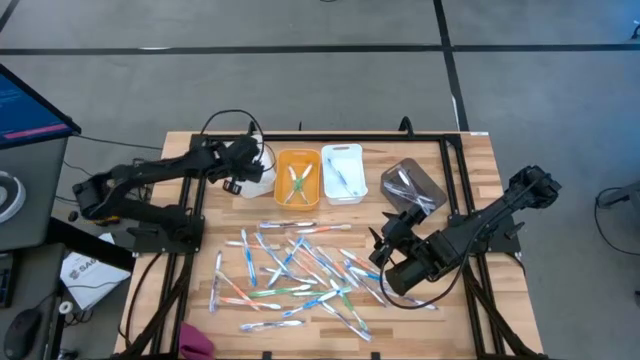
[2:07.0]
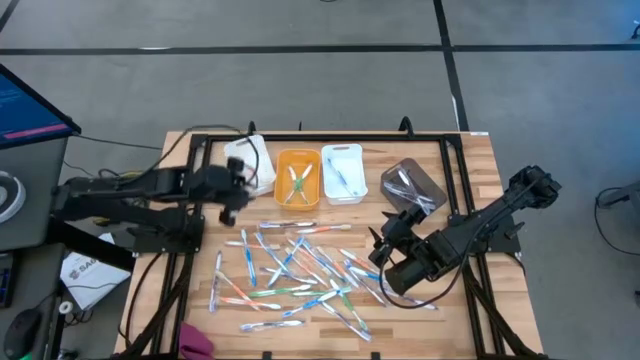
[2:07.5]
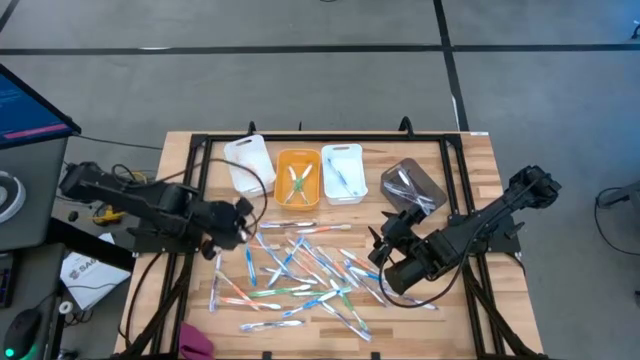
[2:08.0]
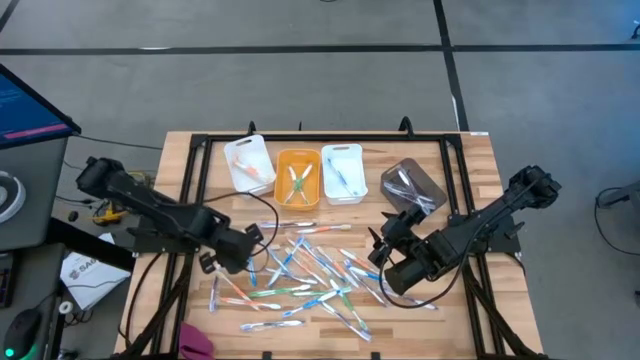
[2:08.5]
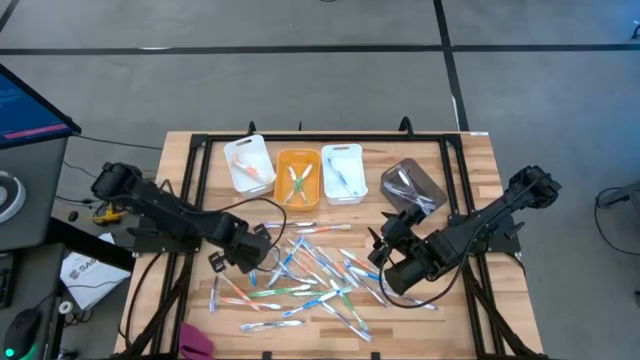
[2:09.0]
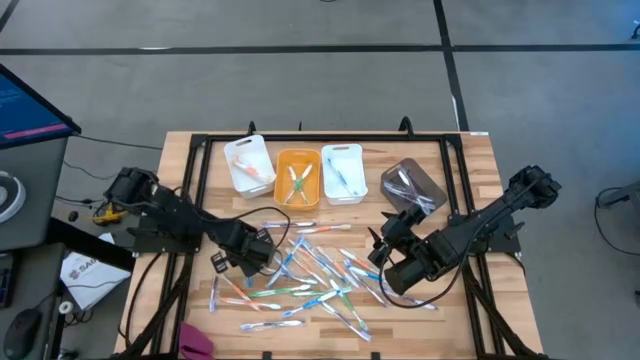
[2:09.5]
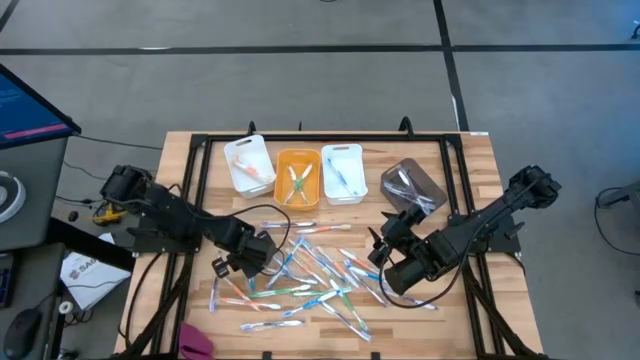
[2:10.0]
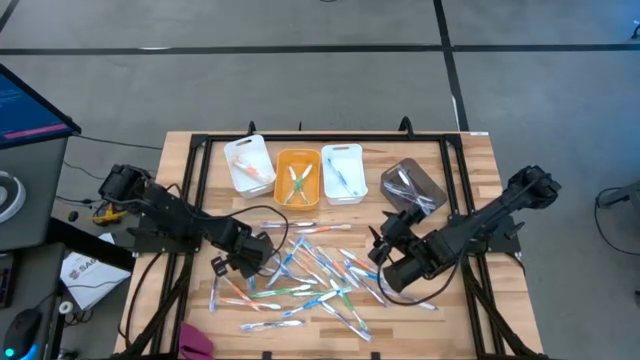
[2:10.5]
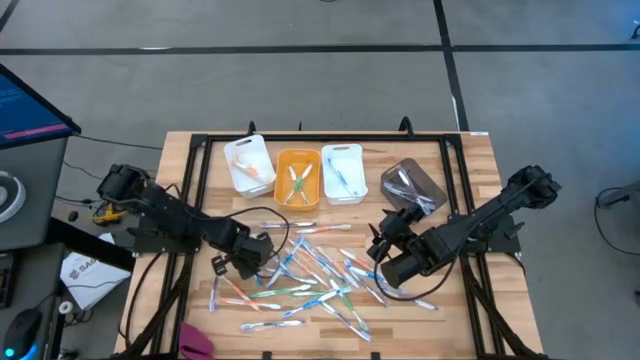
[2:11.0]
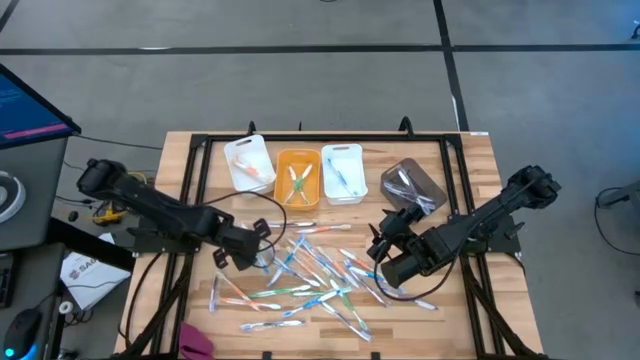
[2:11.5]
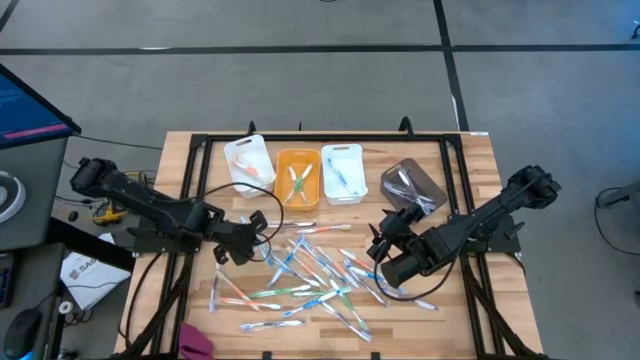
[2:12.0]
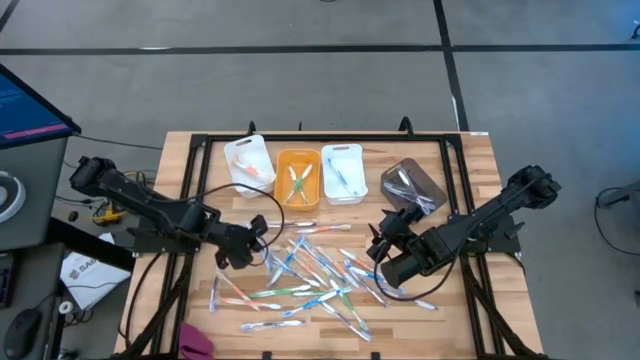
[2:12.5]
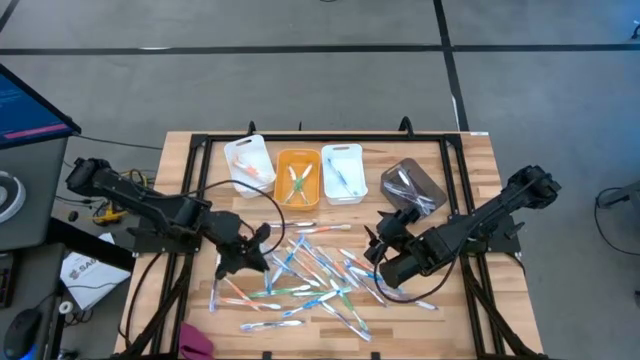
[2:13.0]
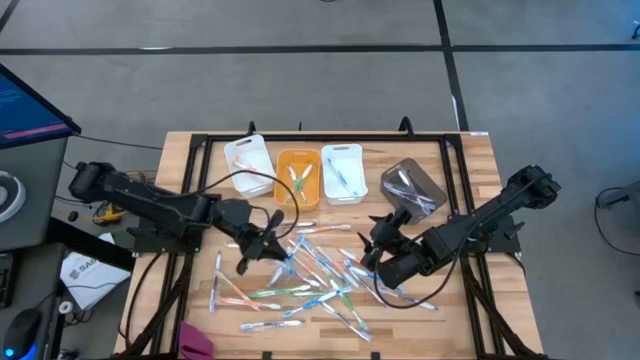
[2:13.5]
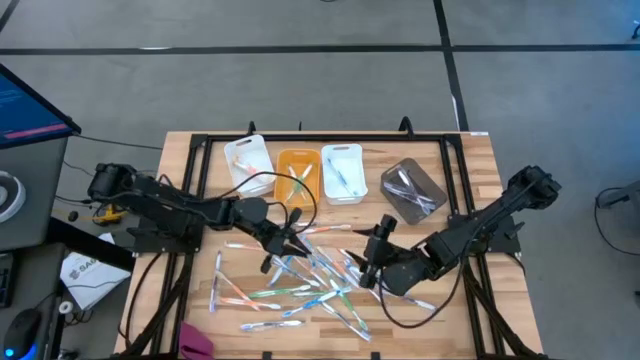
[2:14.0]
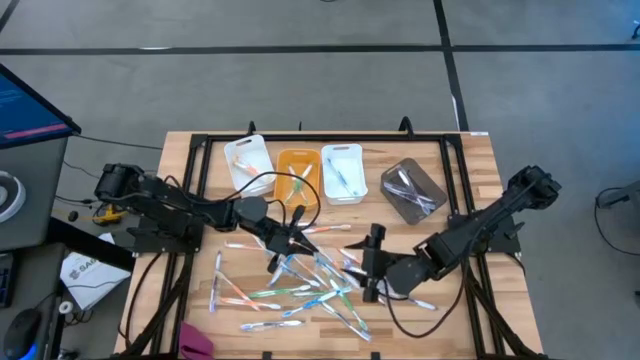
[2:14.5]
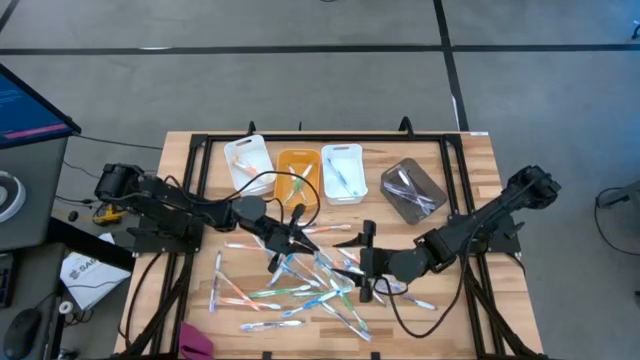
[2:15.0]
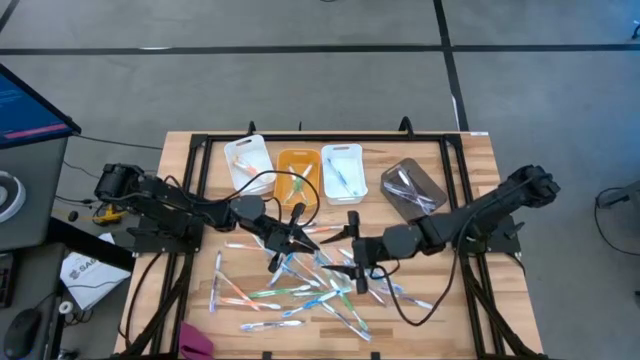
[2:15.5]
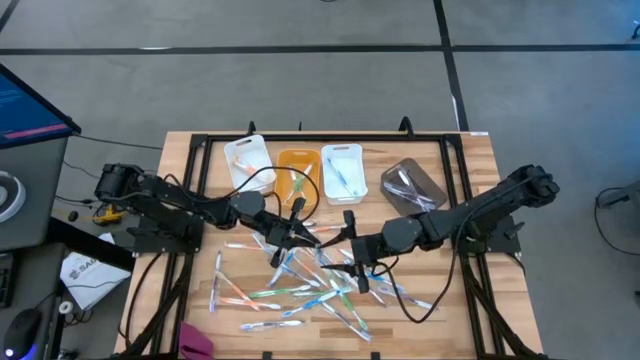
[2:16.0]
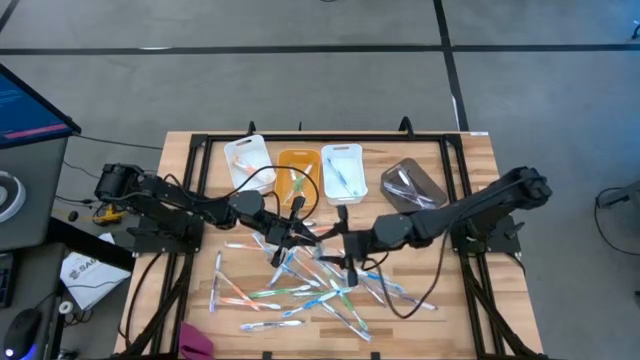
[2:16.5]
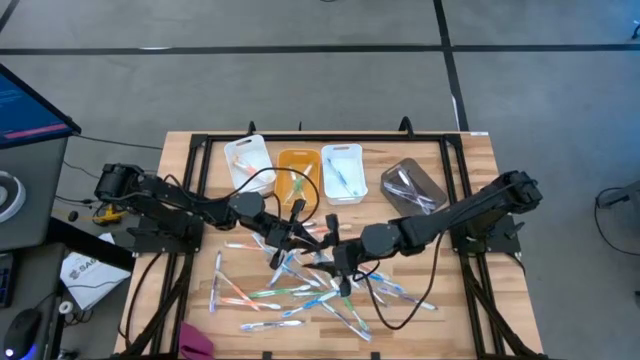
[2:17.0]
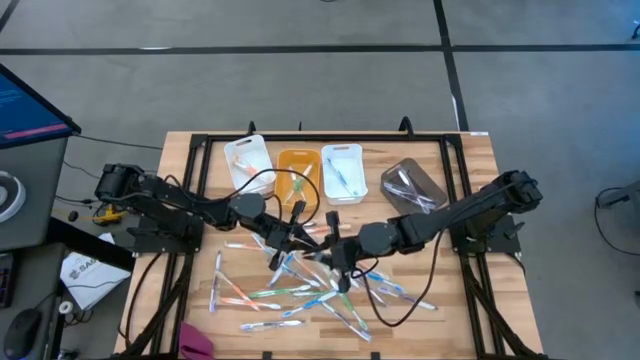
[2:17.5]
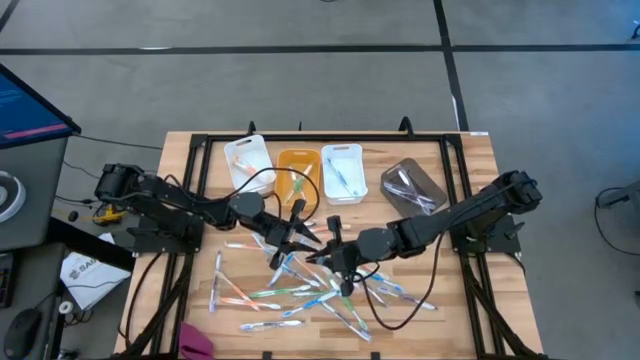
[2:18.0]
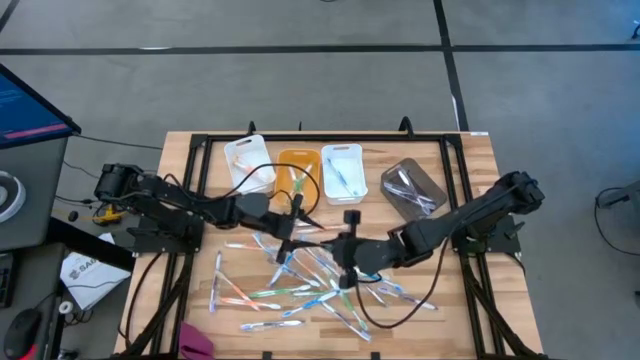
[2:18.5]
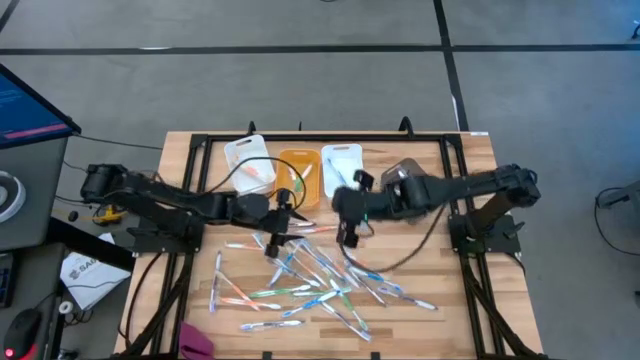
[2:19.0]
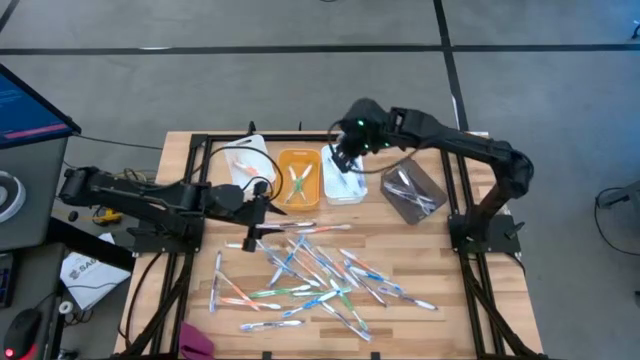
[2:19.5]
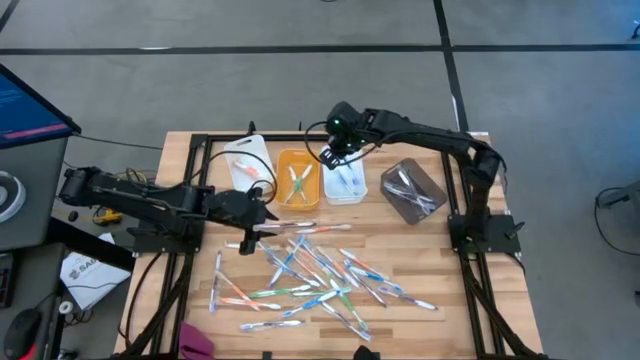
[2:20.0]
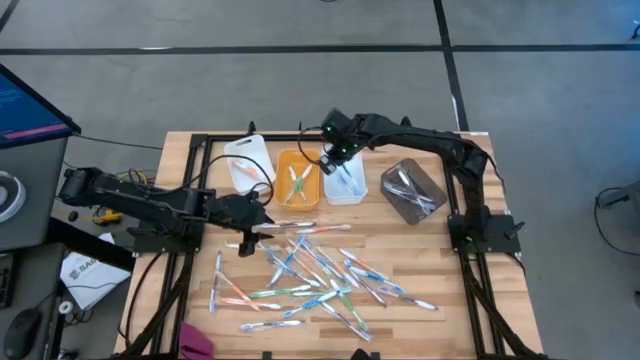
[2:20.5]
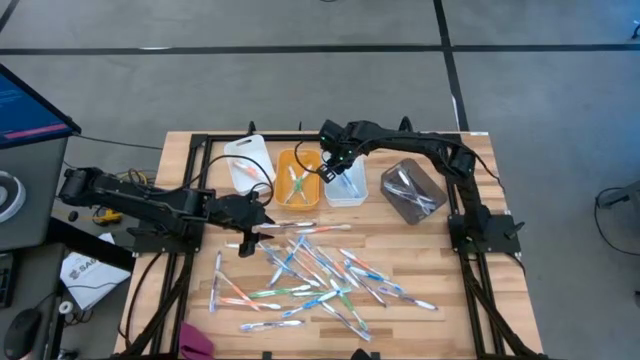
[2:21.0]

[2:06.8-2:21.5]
Task: Pick & Place Toothbrushes
Put the white blue toothbrush into the right white bin

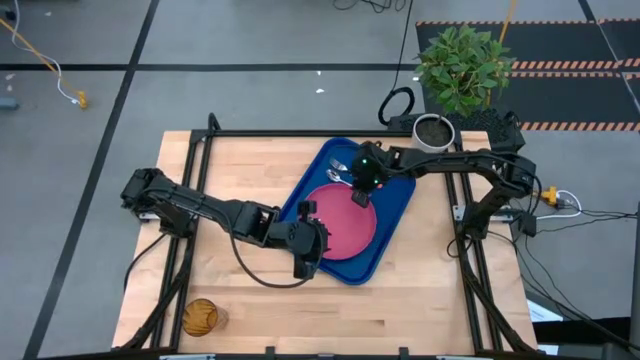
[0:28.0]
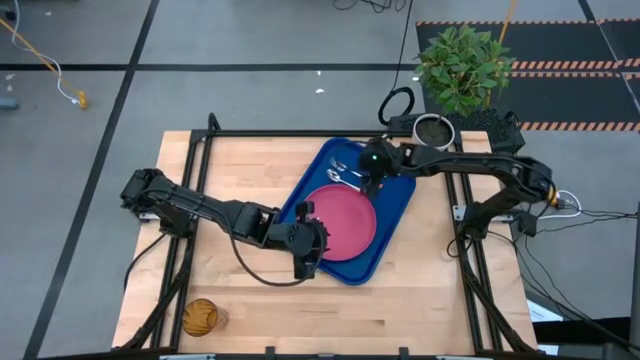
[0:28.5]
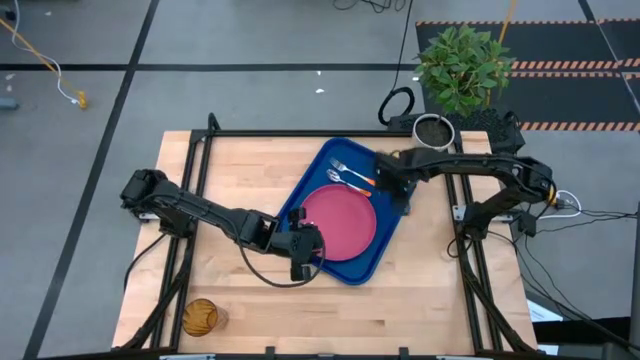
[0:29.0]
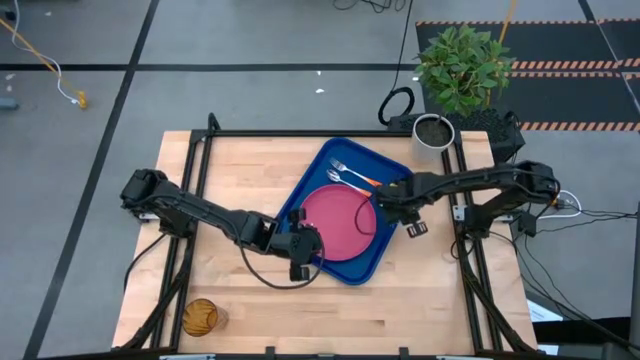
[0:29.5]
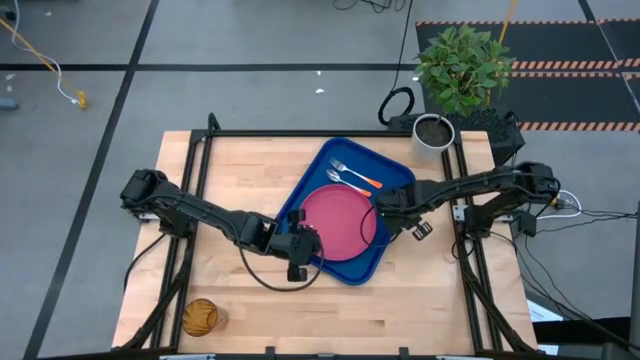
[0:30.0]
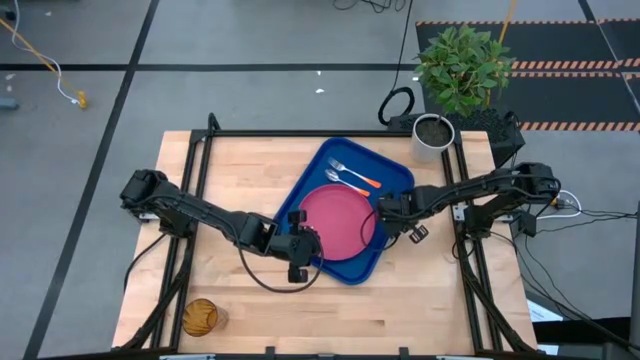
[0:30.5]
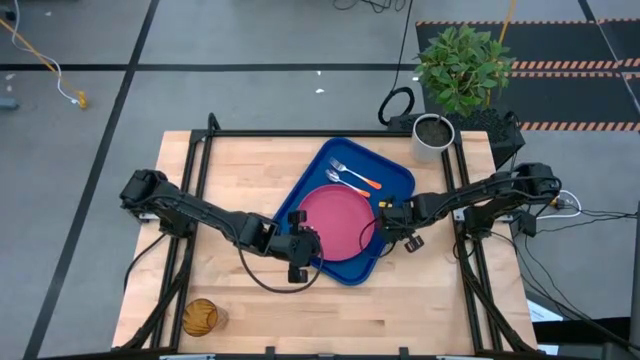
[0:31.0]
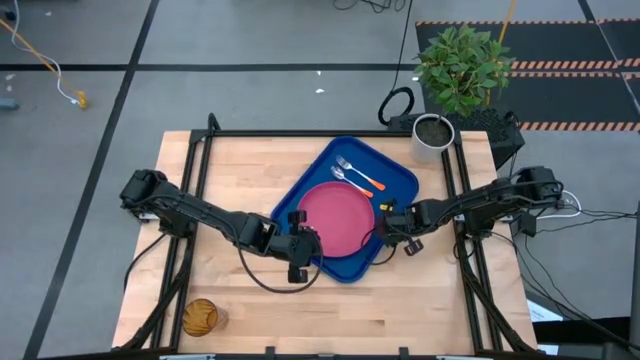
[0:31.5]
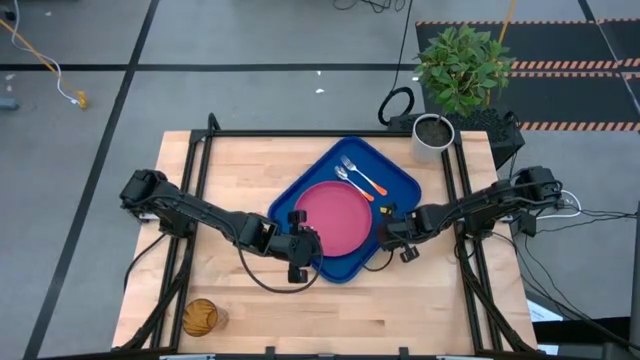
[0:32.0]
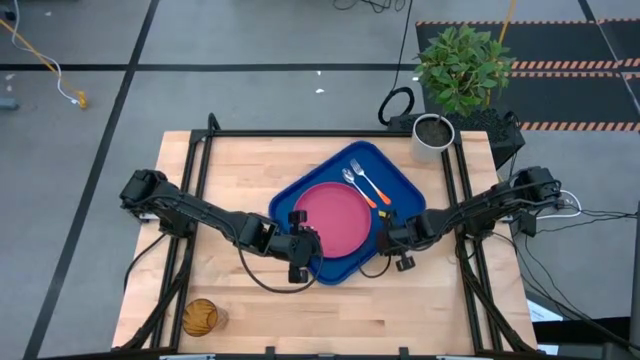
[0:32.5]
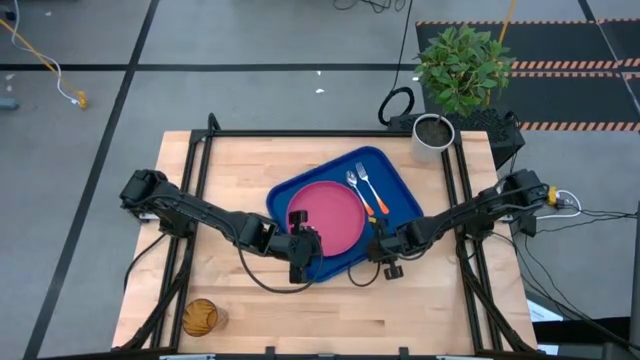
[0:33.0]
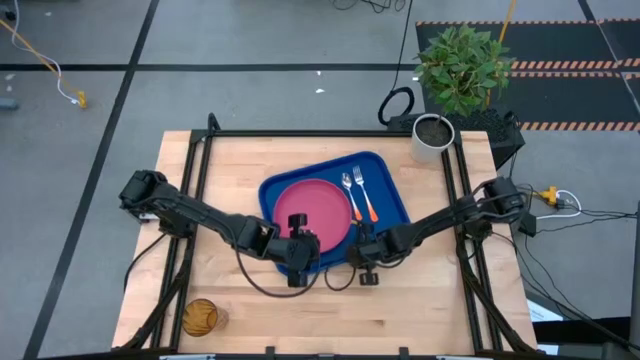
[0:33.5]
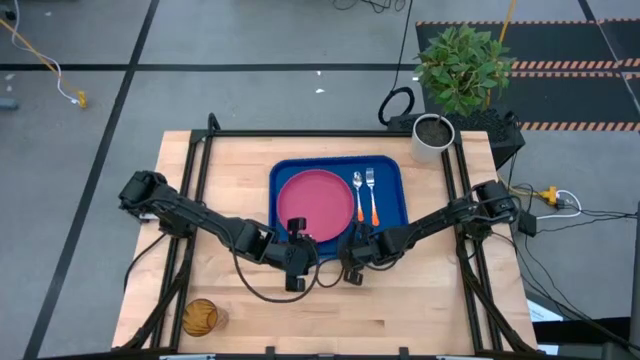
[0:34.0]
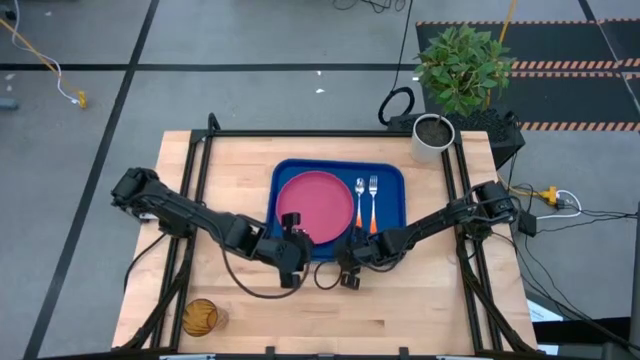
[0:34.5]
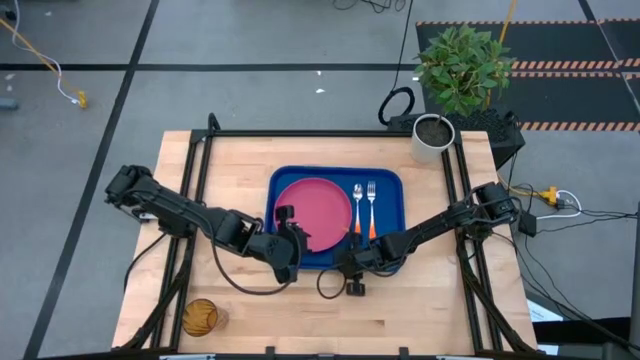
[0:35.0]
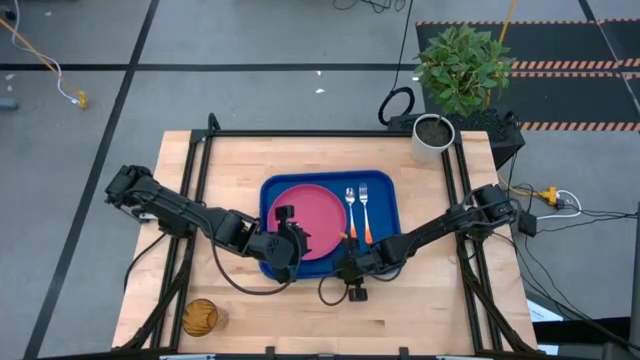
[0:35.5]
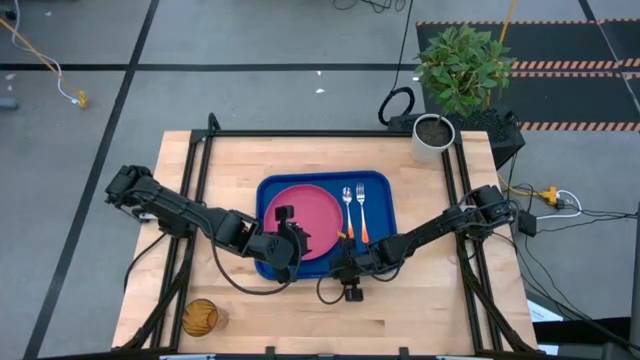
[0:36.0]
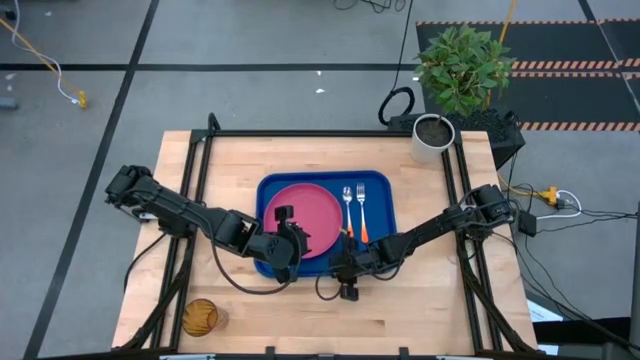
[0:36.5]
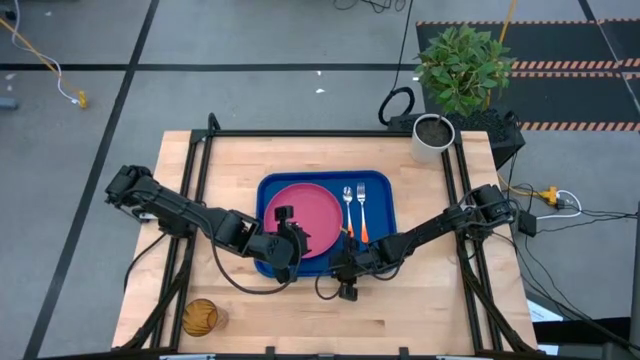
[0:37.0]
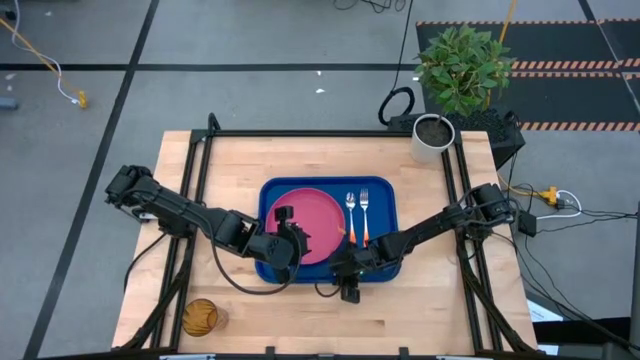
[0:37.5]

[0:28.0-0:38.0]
Task: Pick and place plate/cup/fork/spoon on tray
Adjust the blue tray
